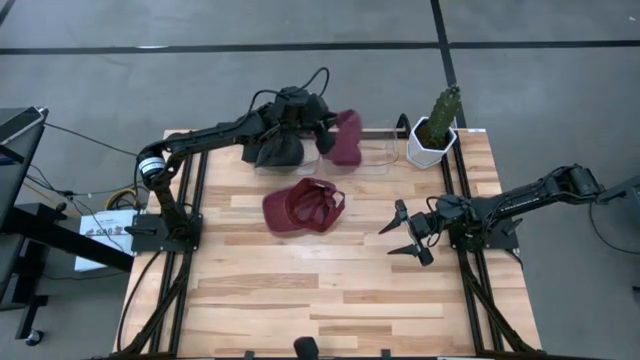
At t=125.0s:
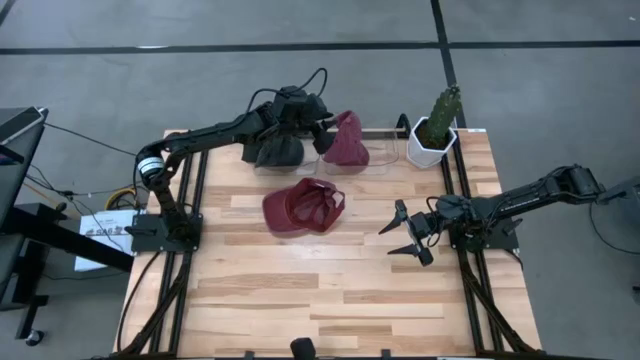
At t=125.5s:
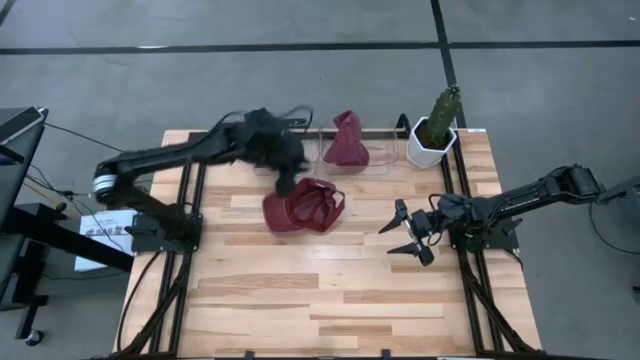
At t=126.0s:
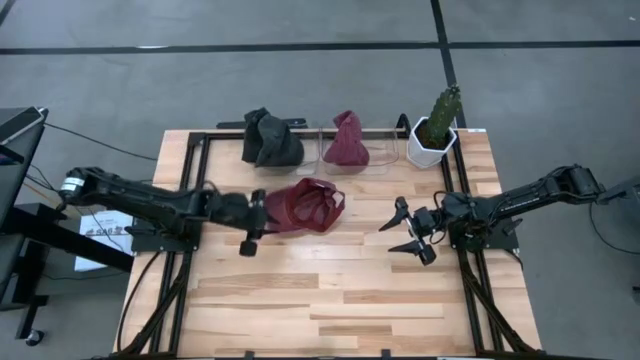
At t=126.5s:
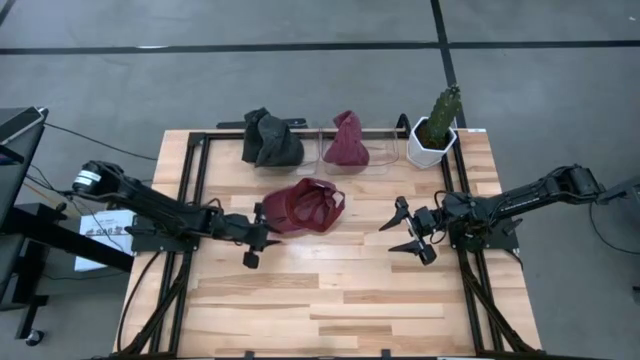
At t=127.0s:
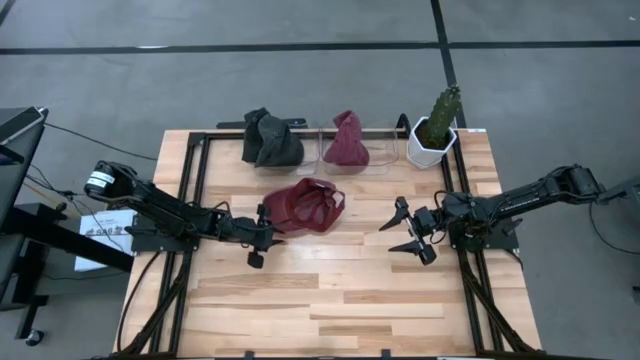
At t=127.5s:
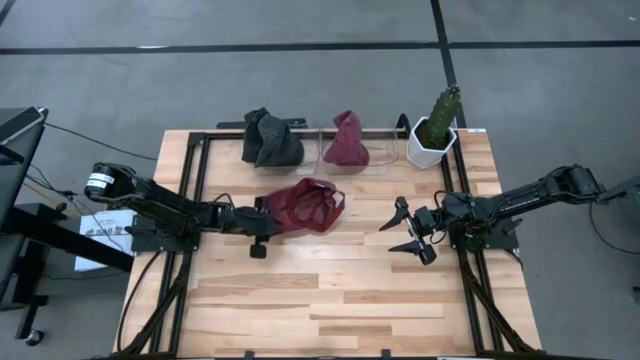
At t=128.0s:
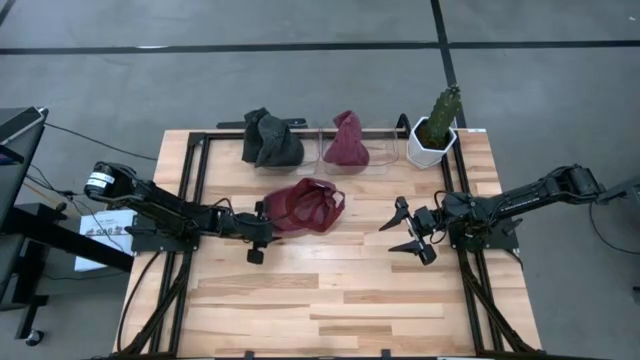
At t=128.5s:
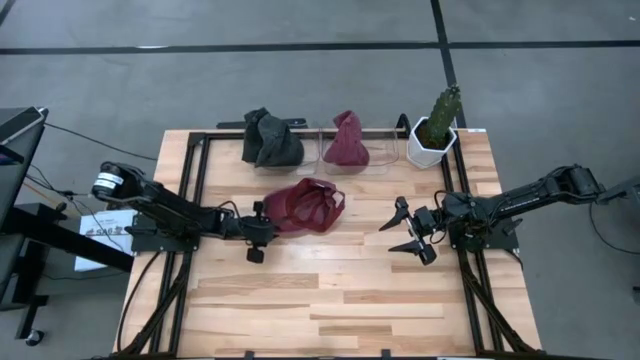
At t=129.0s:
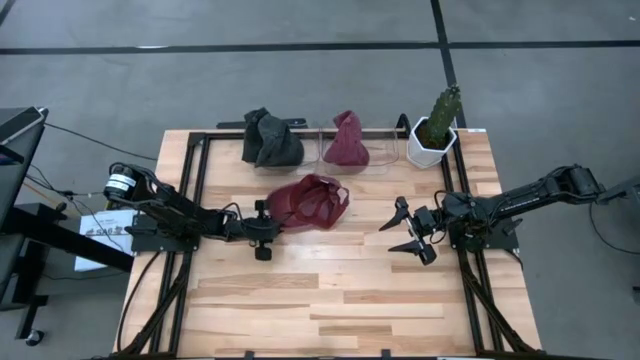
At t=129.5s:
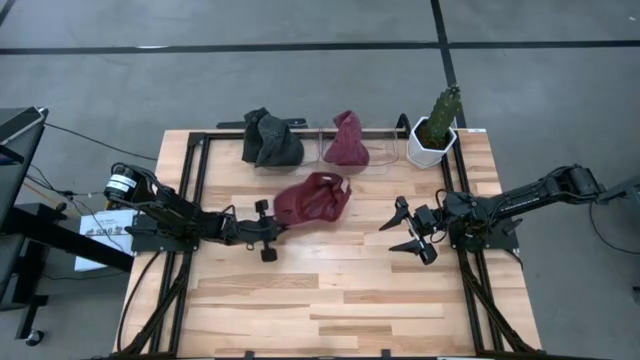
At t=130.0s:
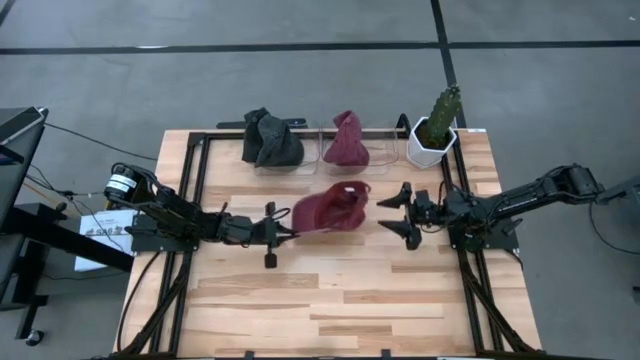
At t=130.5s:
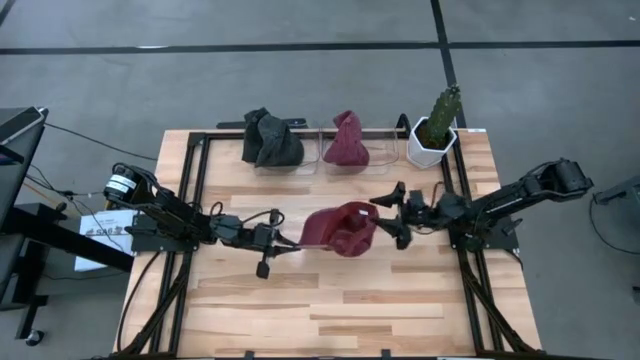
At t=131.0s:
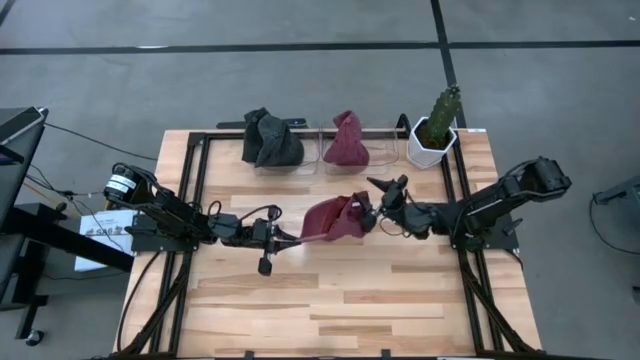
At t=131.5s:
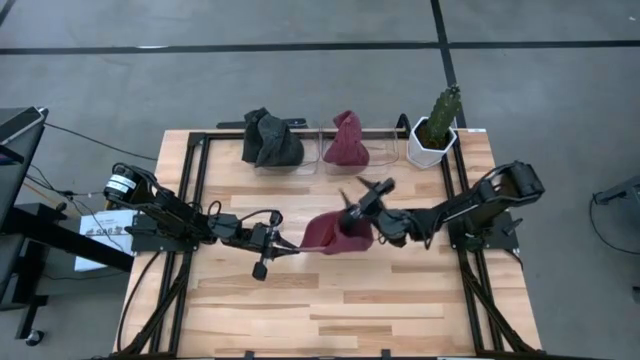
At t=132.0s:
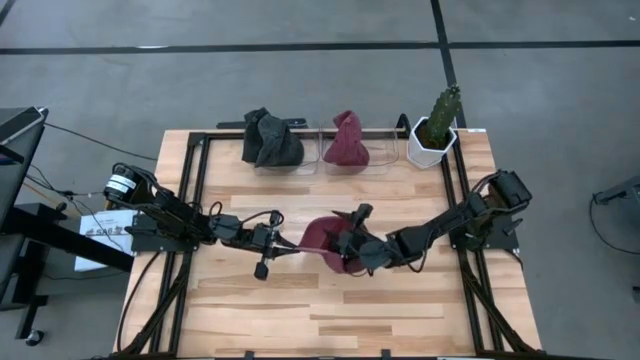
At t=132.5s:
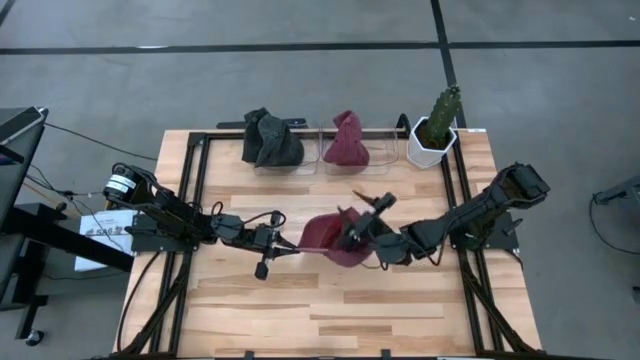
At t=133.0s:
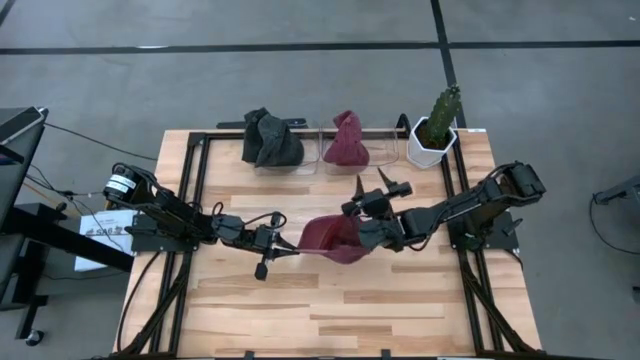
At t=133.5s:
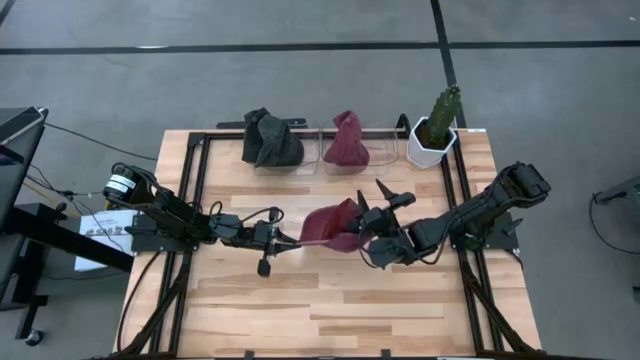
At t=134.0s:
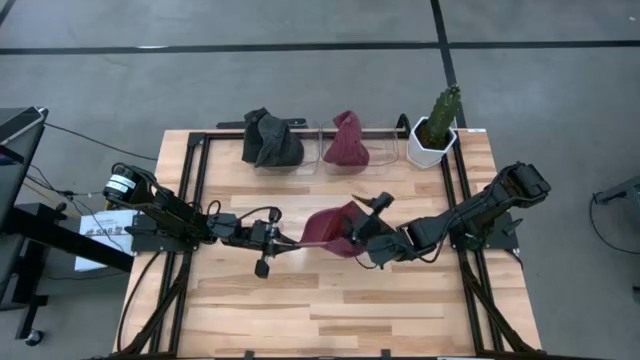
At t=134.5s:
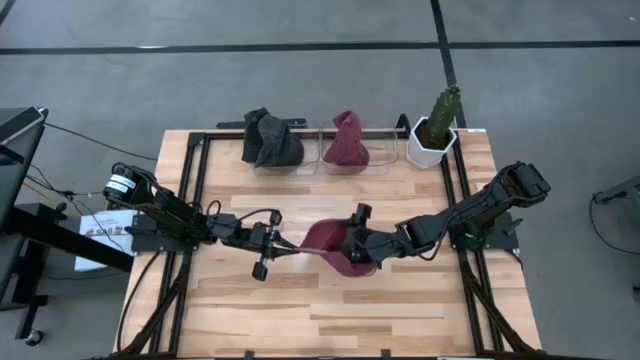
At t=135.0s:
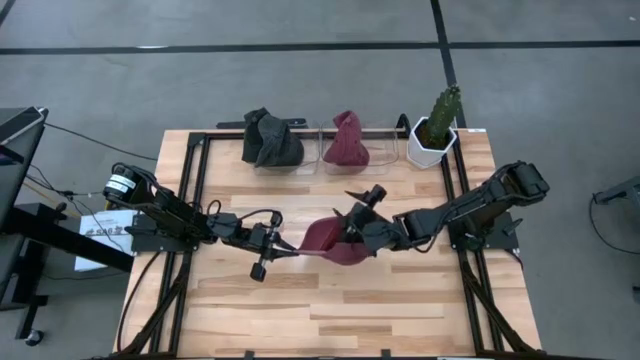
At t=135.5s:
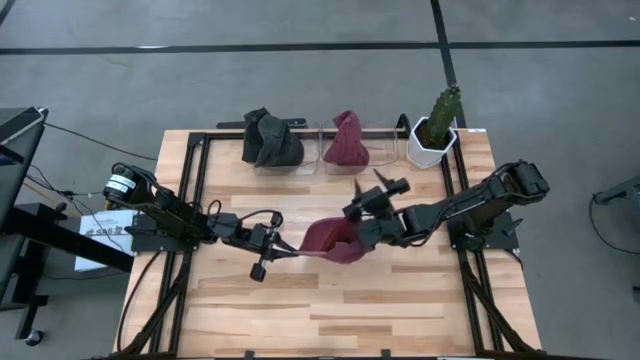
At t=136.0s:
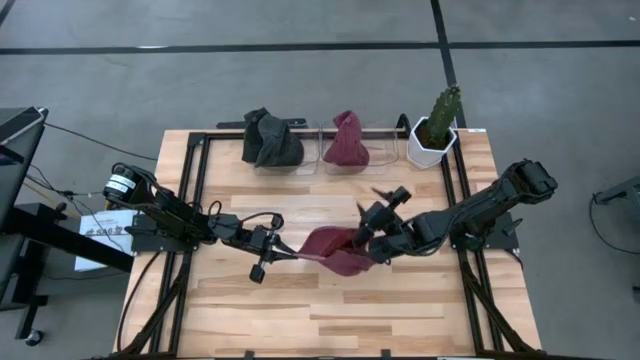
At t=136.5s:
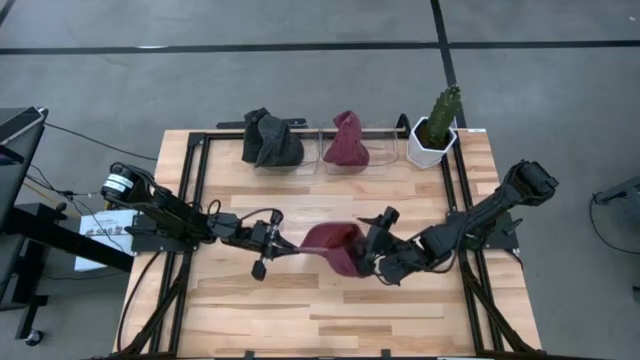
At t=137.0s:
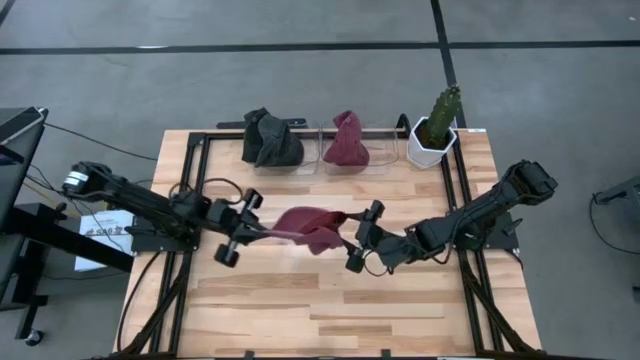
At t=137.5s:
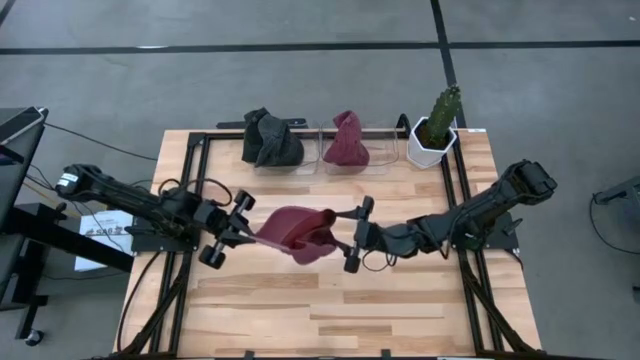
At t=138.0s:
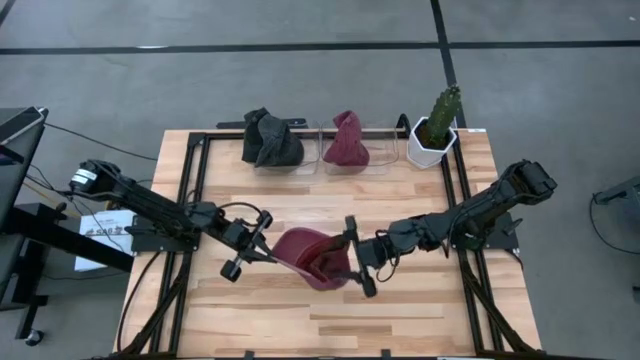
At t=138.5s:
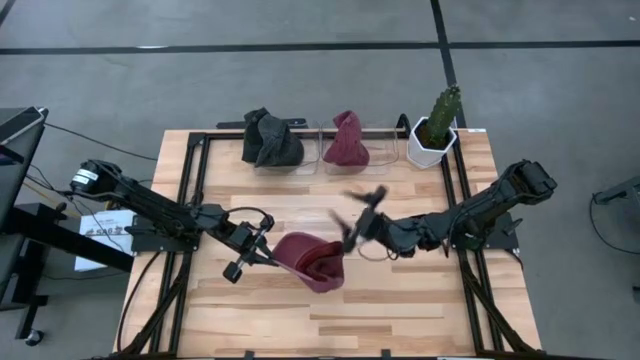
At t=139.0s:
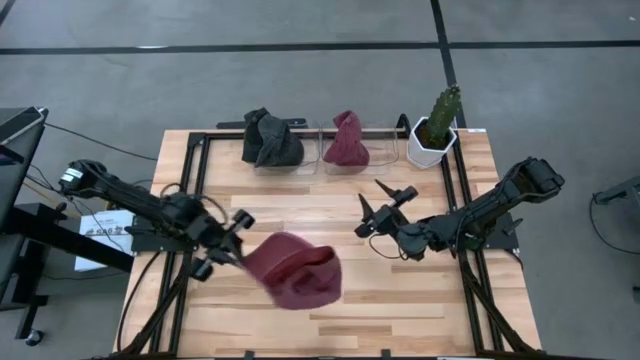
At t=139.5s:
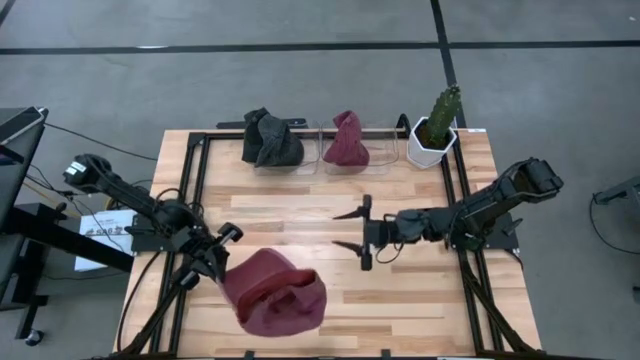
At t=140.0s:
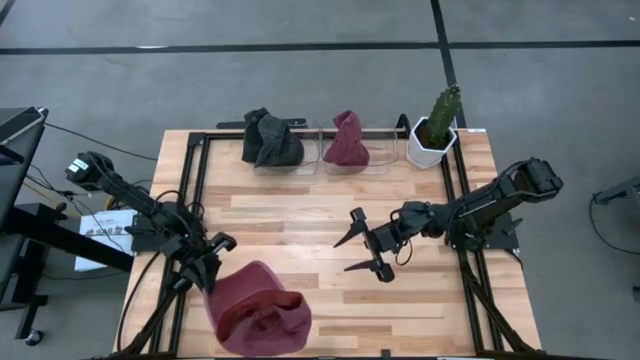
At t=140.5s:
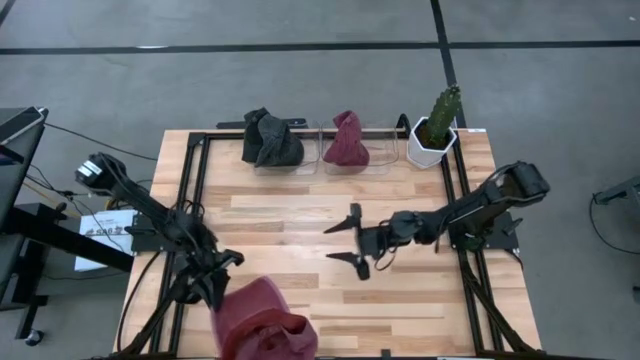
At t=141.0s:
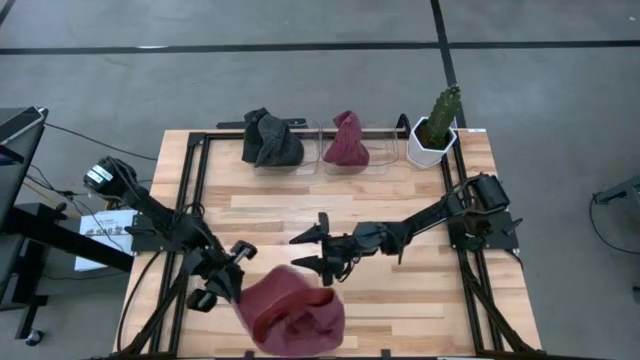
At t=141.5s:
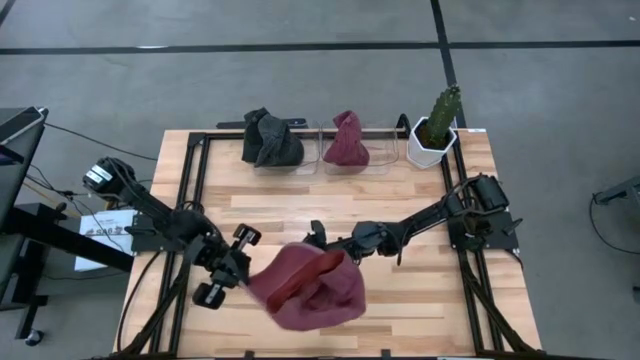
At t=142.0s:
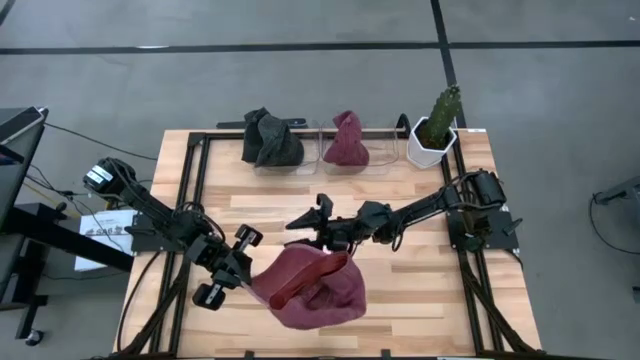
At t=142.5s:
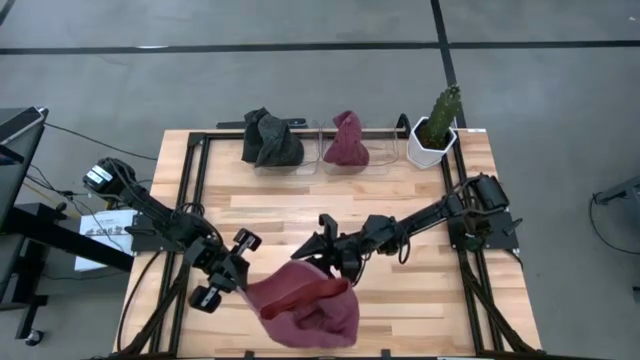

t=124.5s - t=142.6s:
Task: Pick & Place hat
Put the red cap into the right transparent bin

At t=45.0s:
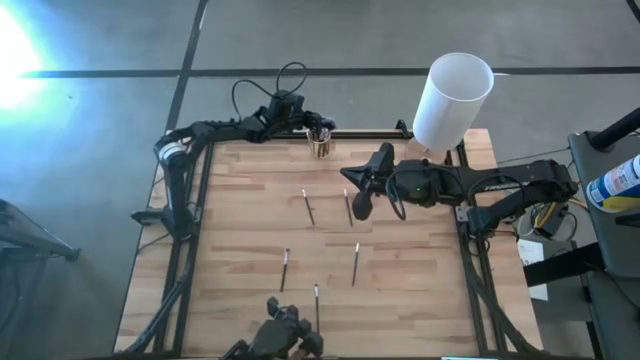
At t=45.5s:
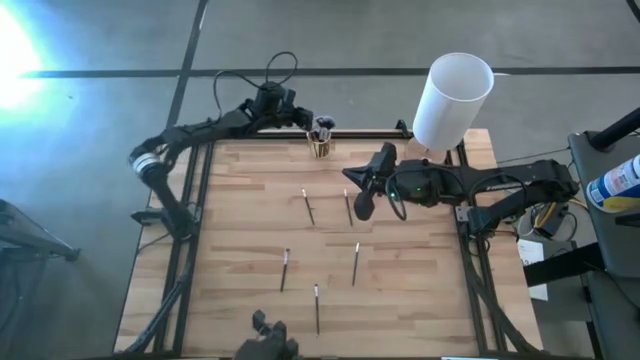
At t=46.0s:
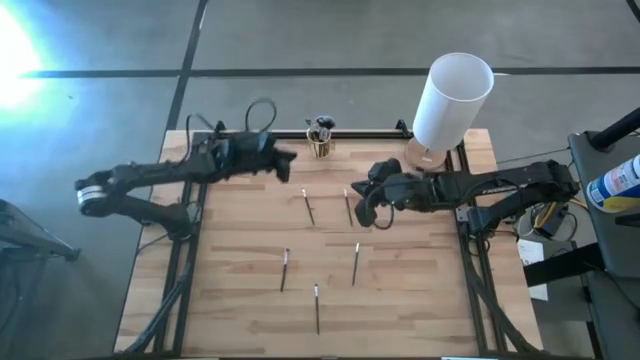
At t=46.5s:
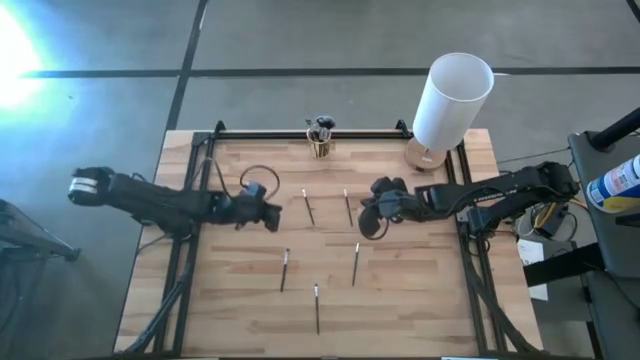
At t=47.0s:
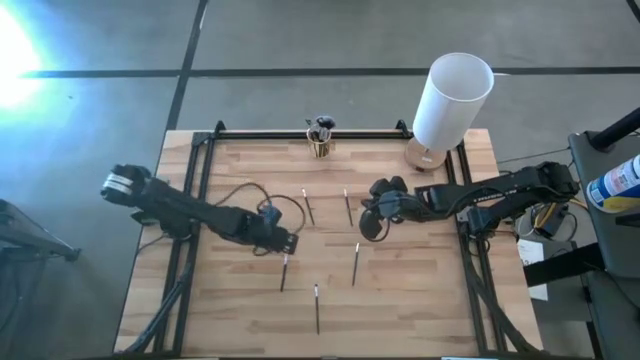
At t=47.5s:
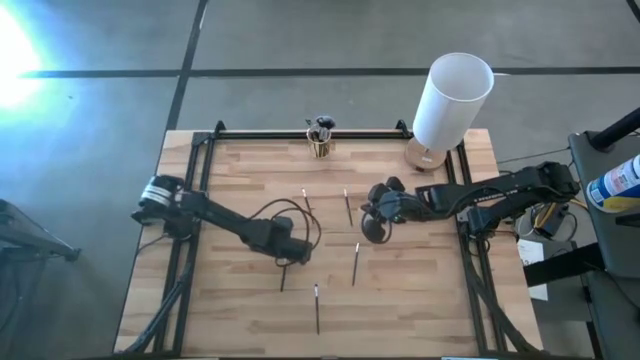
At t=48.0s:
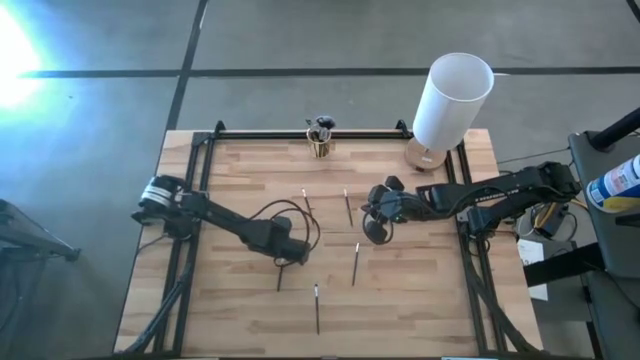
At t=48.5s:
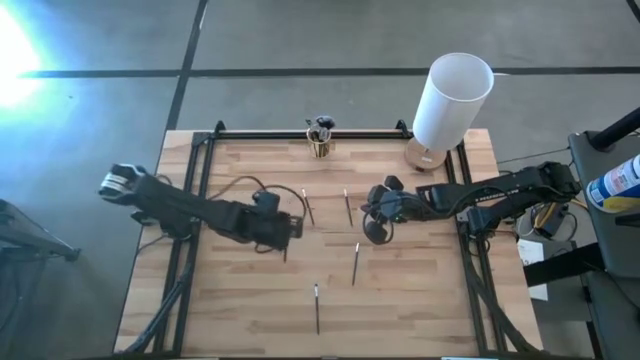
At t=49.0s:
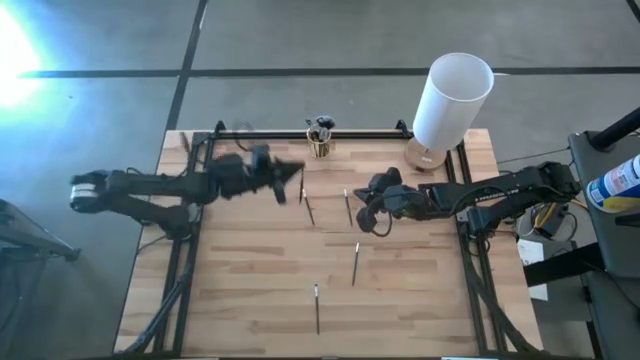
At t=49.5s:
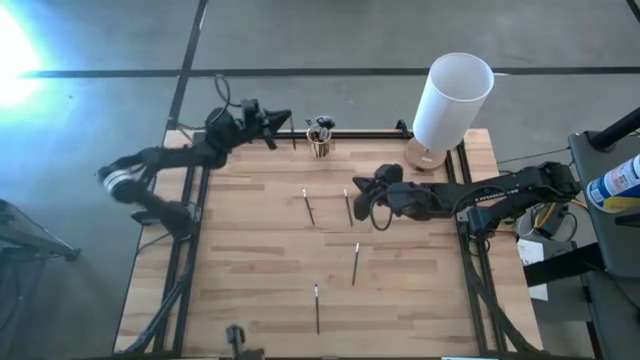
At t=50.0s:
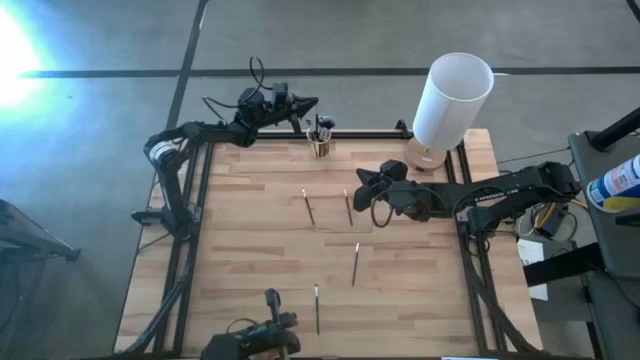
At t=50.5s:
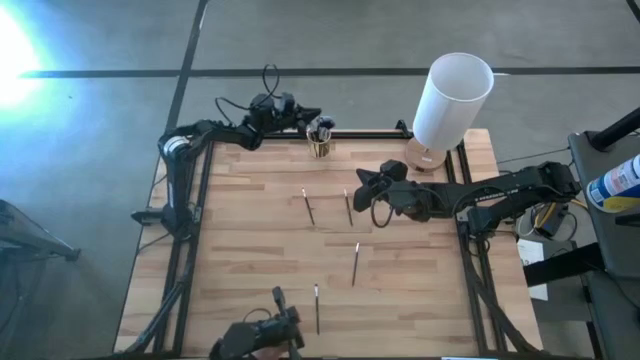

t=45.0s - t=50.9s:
Task: Put items in baskets/containers
Put the black eyeshadow brush into the yellow pen holder
